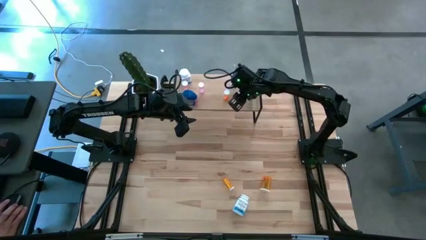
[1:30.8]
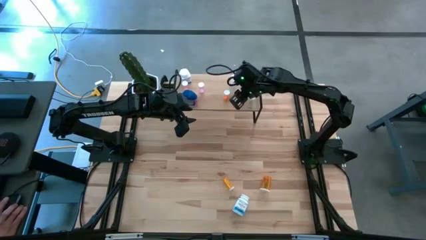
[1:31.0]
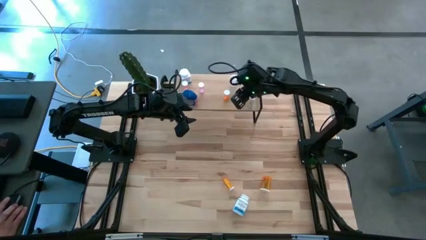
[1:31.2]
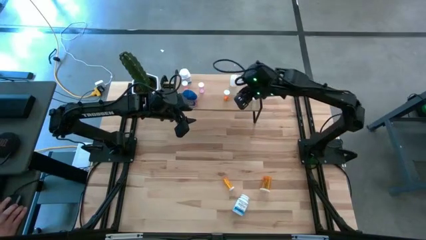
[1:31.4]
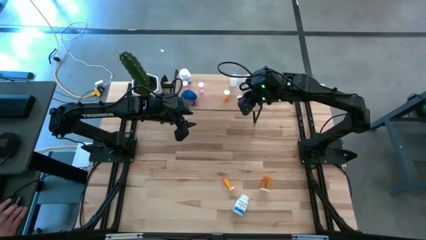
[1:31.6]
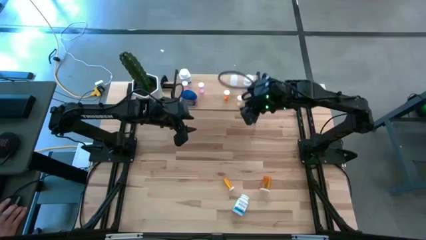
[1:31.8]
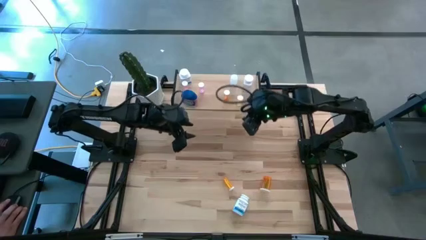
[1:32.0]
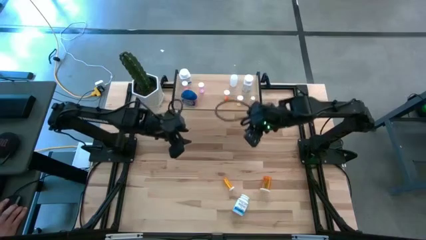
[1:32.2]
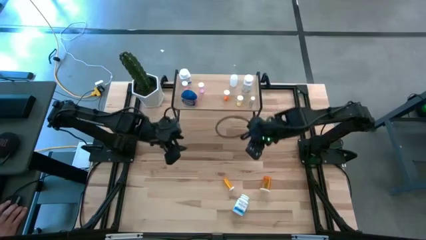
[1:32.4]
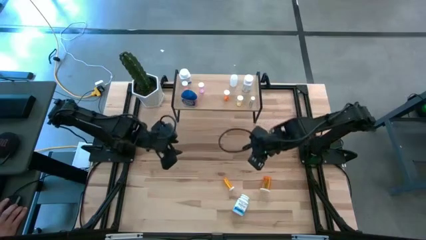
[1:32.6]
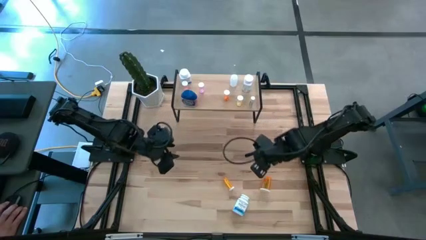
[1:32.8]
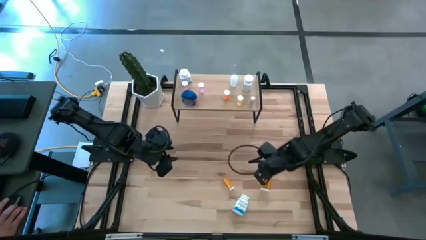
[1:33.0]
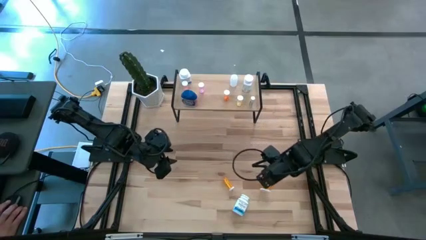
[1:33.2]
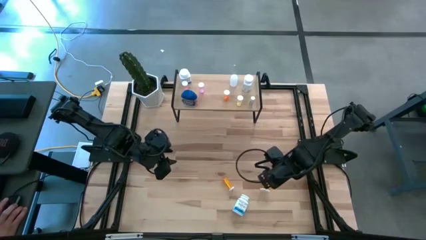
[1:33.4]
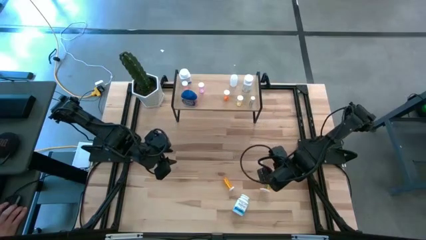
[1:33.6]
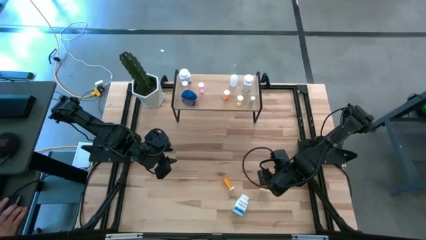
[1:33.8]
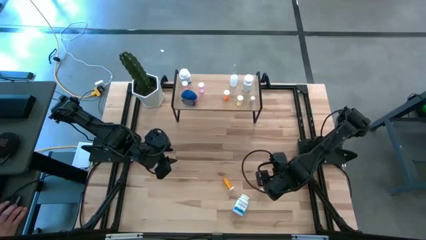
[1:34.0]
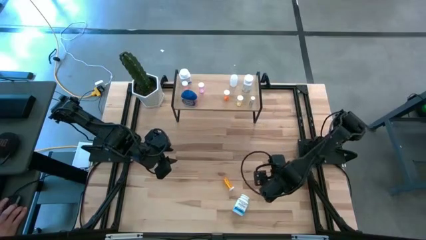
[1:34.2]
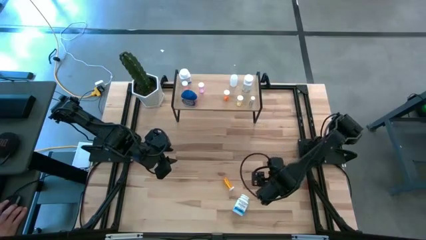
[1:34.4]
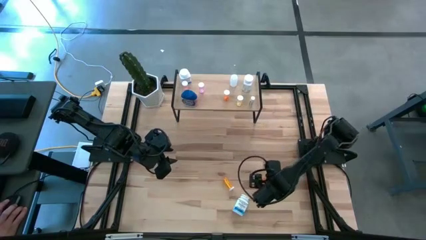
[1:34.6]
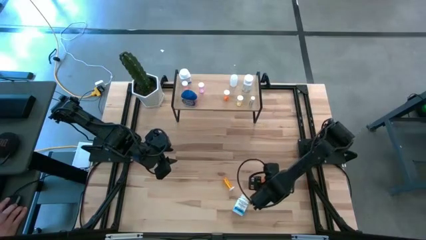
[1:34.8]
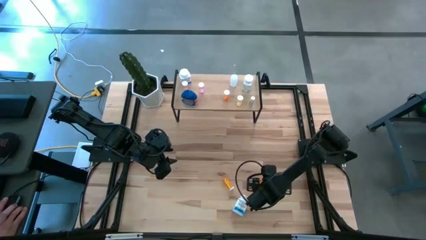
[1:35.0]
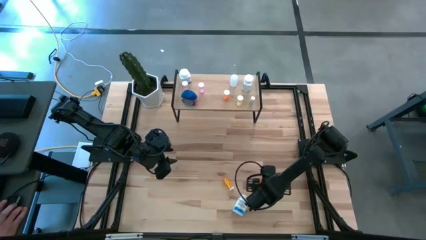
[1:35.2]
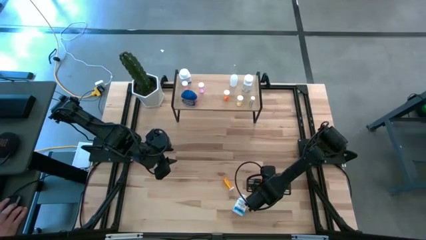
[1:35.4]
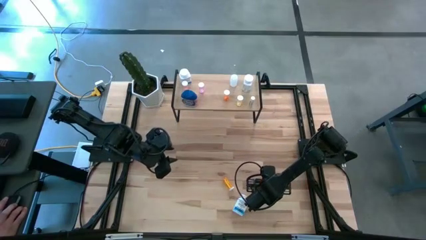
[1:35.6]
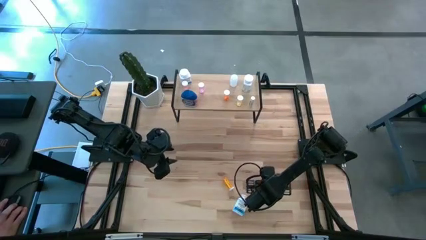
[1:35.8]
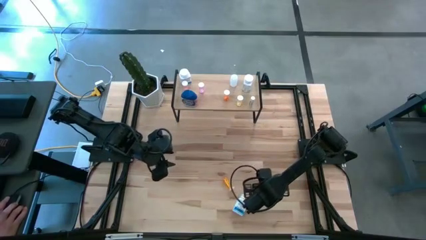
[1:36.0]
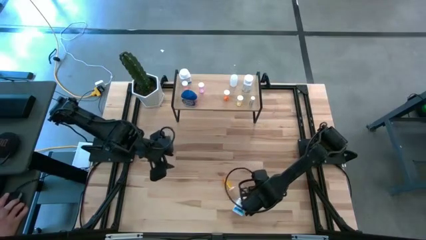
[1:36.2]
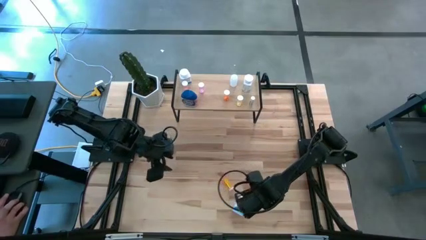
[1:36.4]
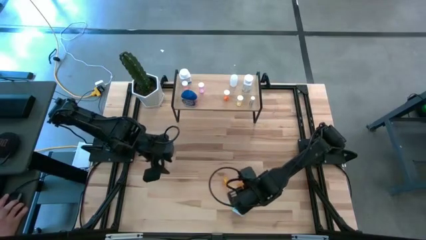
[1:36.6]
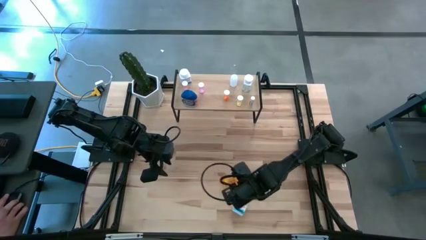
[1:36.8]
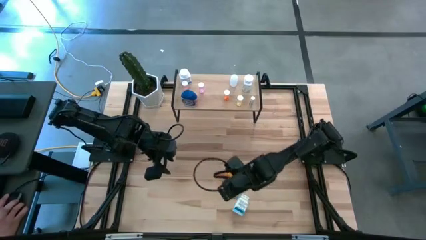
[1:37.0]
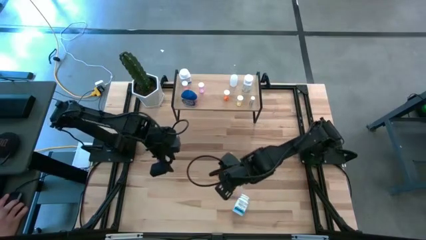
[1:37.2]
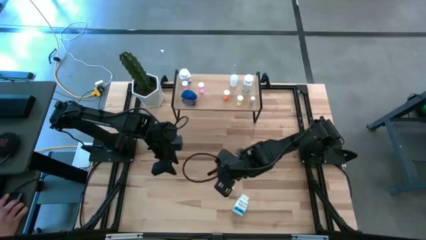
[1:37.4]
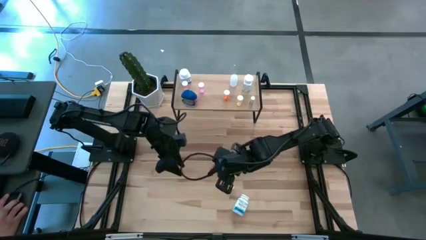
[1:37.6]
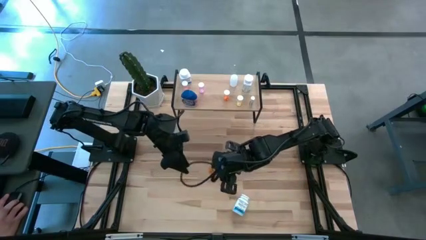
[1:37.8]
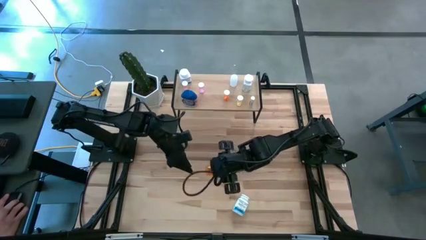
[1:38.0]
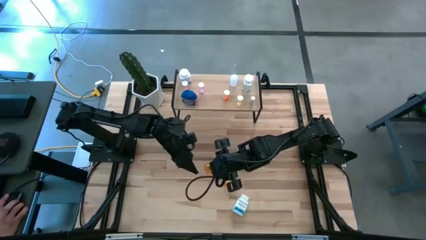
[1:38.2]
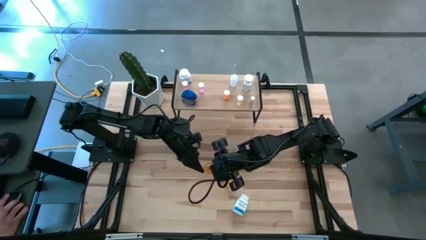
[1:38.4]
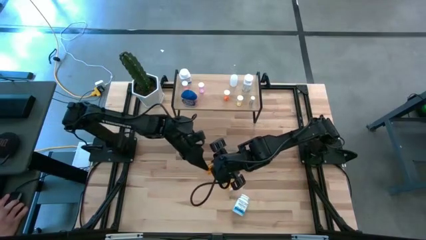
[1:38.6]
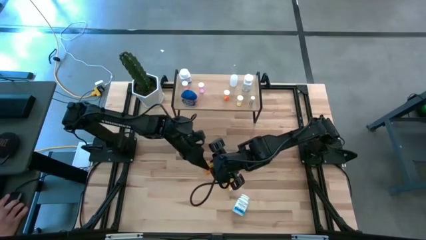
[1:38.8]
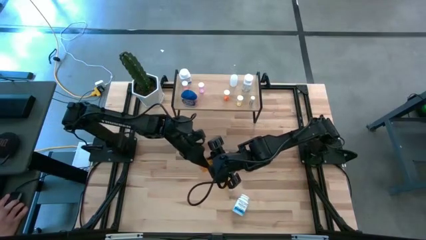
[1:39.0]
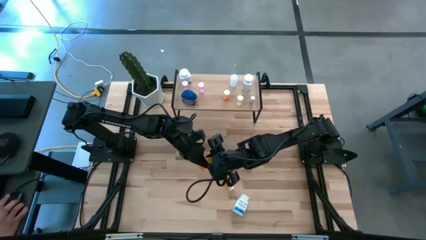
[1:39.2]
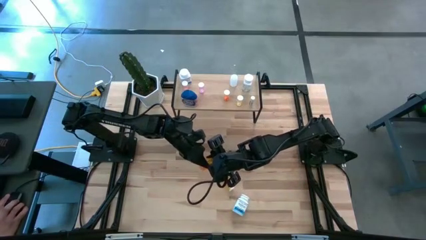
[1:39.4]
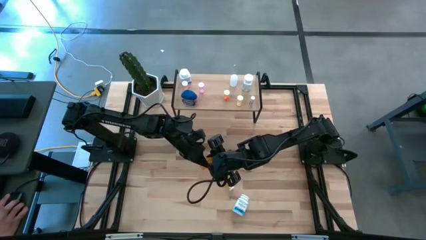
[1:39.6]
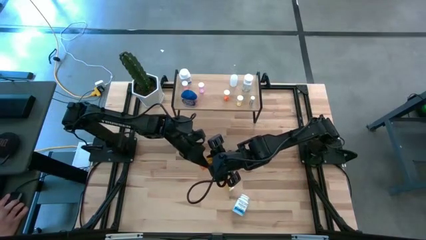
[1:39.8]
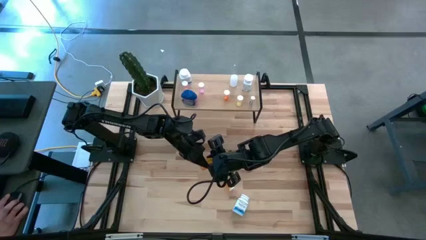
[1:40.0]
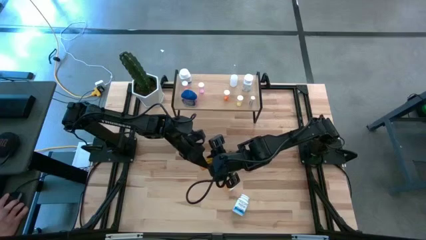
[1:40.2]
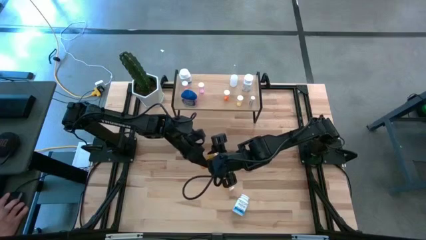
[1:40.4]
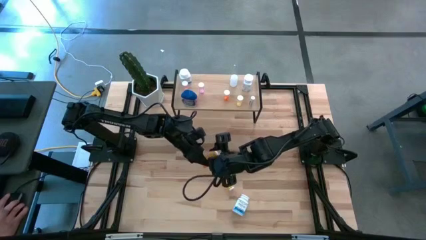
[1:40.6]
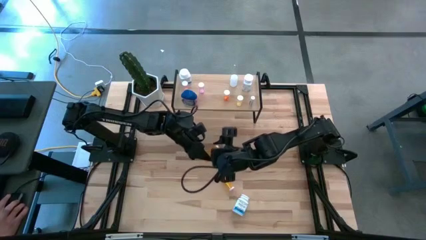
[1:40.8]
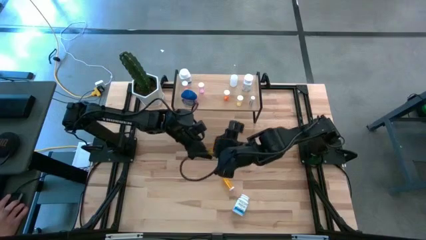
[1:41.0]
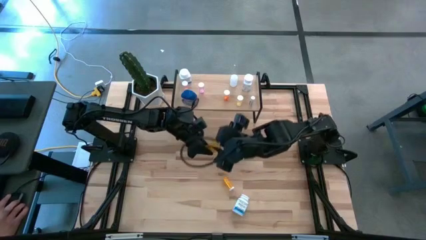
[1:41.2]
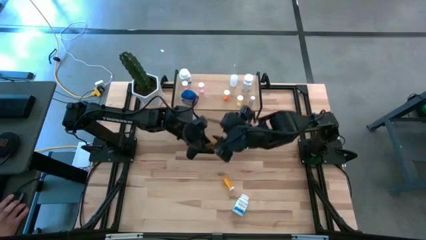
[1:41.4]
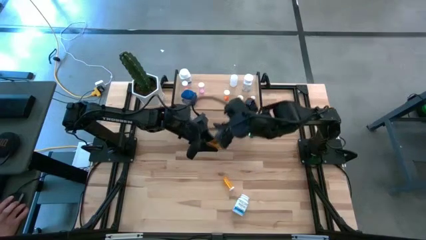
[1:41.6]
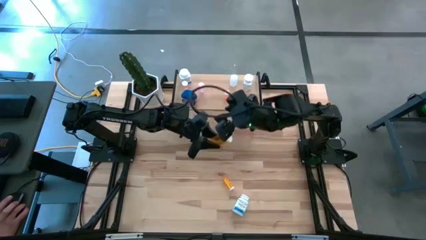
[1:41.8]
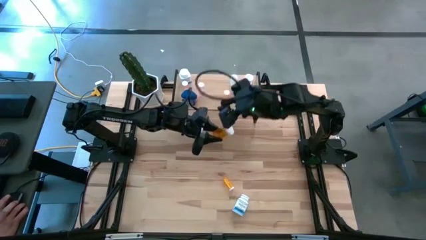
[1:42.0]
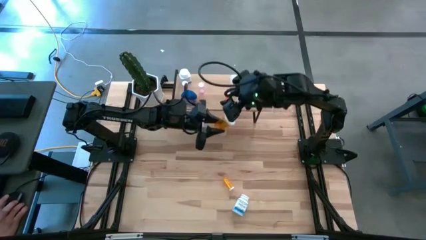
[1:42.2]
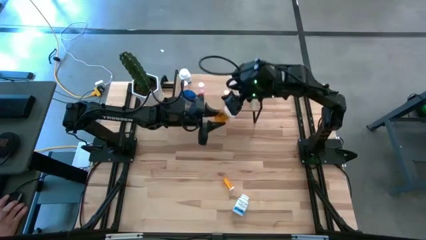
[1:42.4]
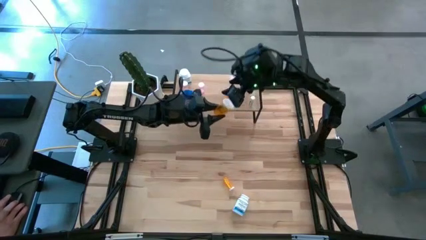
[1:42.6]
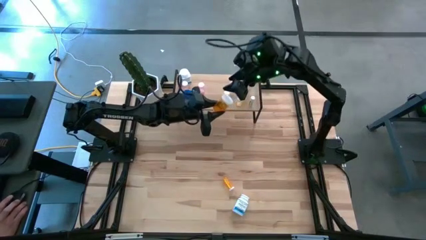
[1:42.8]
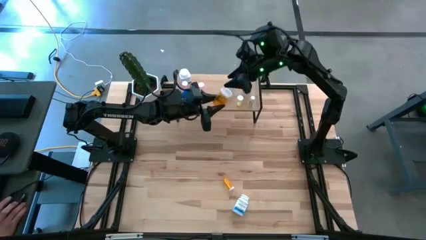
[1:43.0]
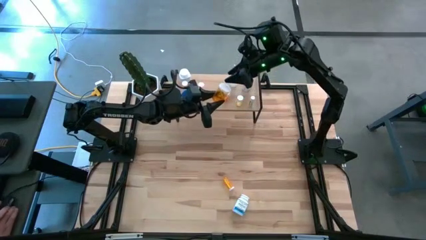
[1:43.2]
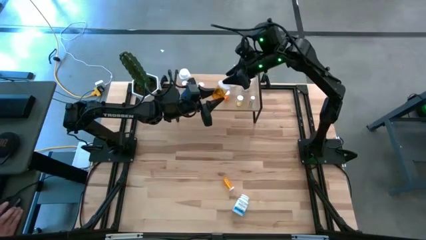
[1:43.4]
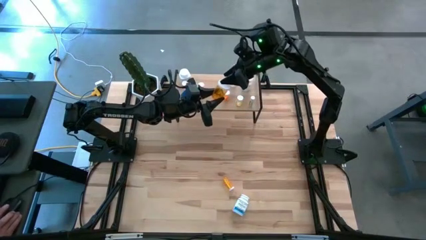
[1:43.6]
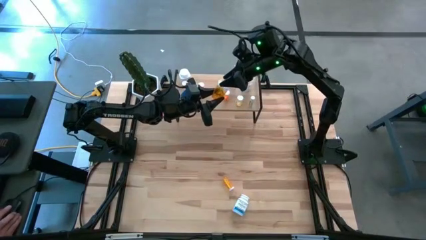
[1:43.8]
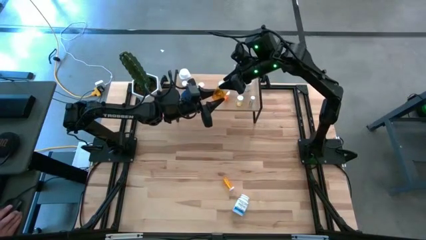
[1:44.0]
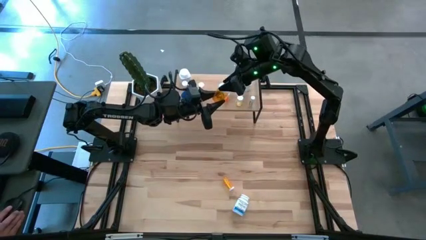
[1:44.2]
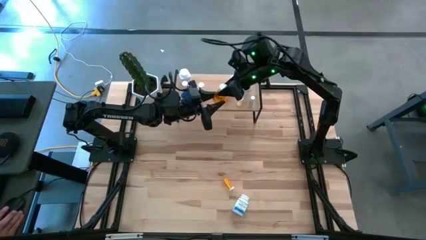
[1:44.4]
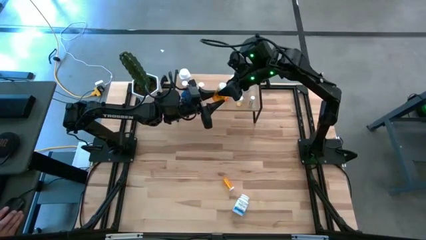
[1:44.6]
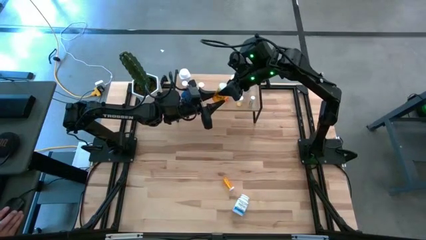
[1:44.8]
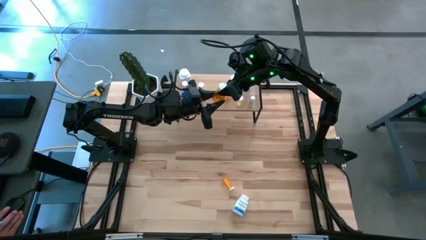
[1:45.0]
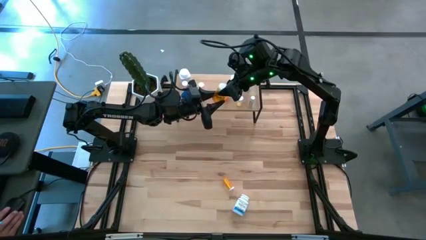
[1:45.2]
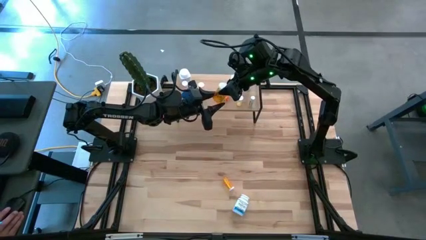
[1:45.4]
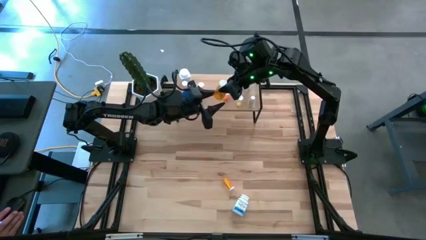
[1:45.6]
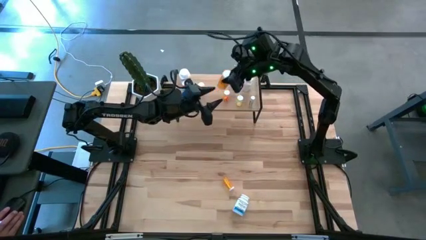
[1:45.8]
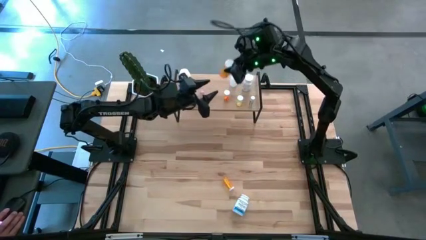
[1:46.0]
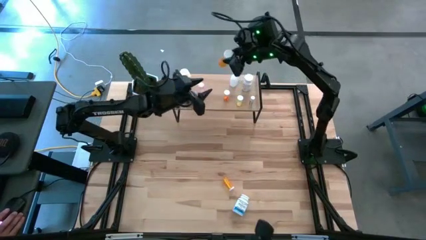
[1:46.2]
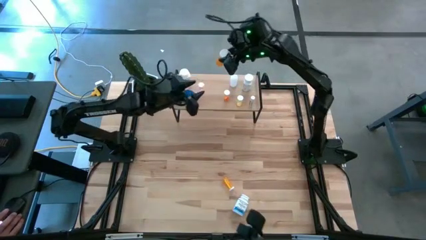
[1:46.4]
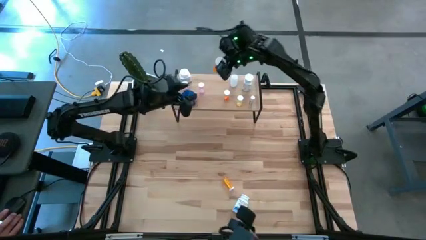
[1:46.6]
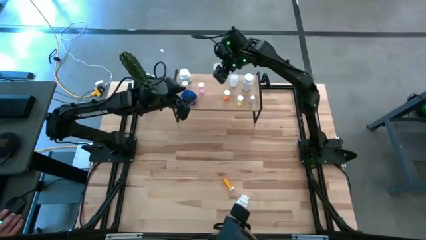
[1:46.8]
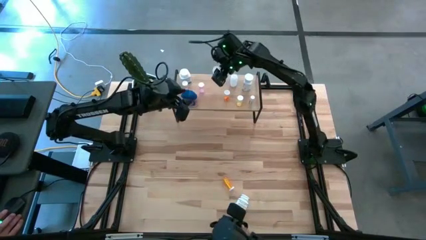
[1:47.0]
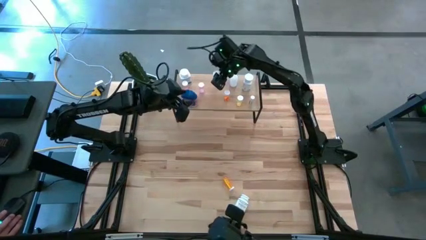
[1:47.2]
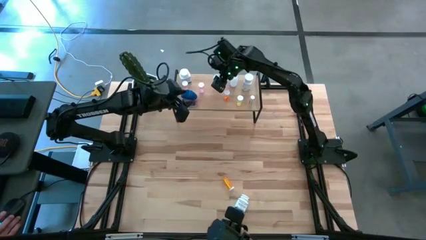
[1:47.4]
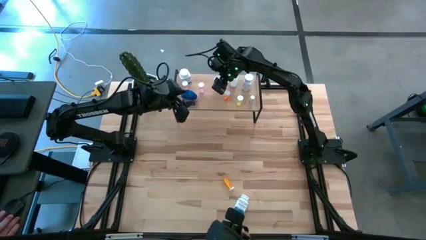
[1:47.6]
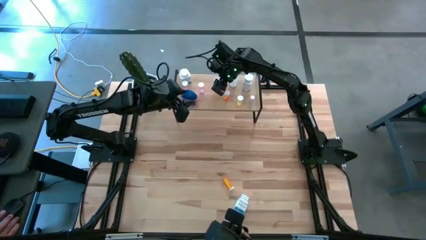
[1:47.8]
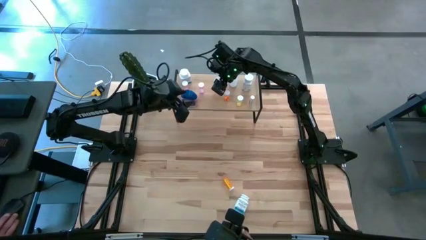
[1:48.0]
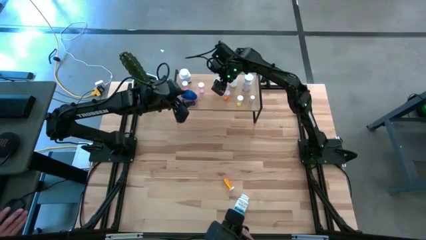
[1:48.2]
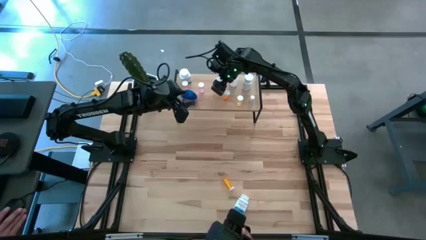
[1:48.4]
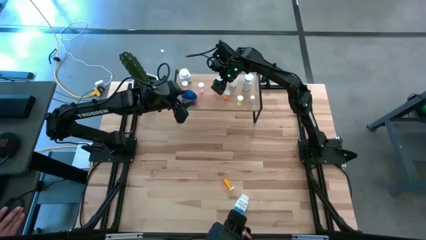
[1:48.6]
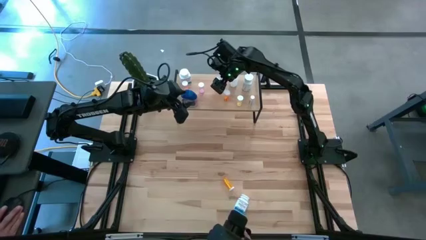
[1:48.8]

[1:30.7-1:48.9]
Task: Pick and place medicine bottles onto shelf by color
Put the orange large pill bottle on the shelf
